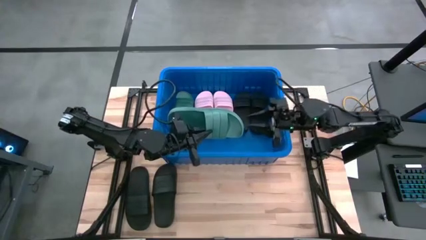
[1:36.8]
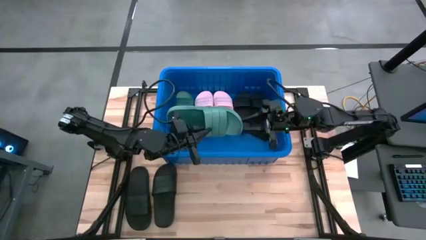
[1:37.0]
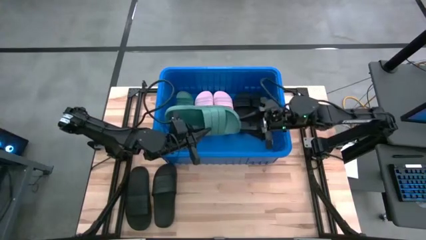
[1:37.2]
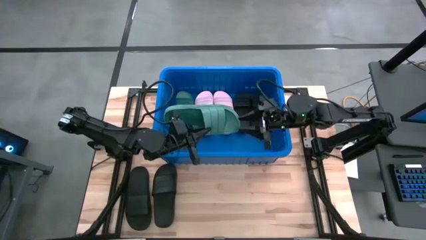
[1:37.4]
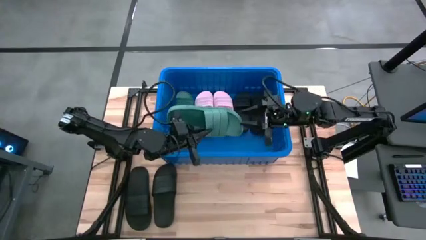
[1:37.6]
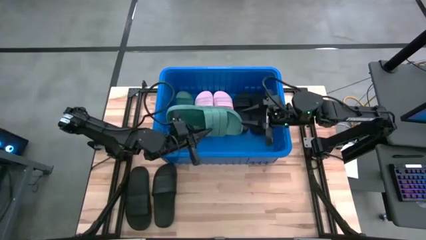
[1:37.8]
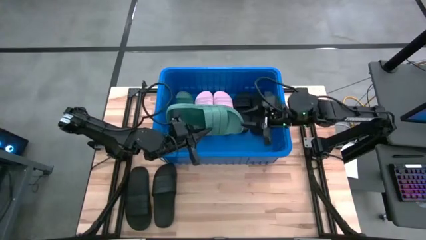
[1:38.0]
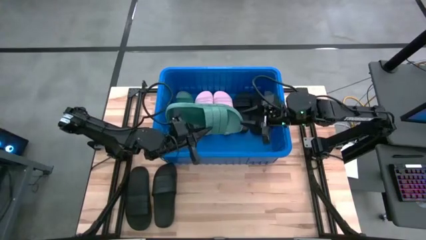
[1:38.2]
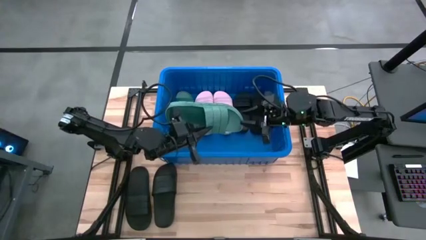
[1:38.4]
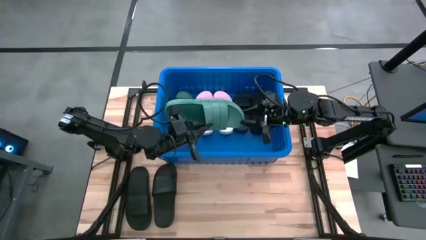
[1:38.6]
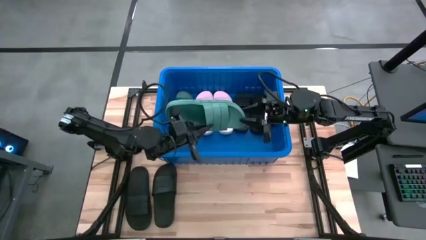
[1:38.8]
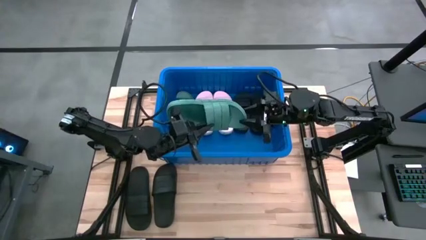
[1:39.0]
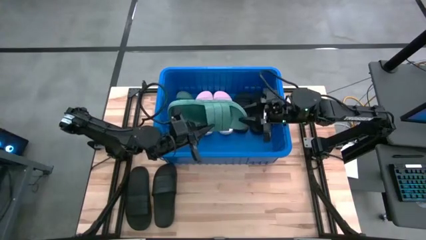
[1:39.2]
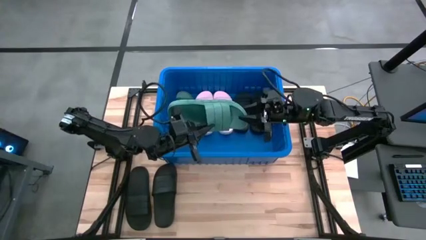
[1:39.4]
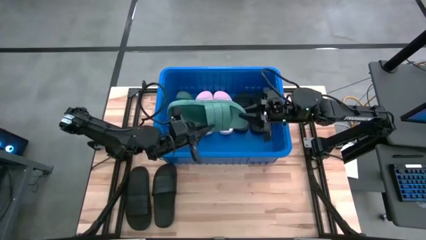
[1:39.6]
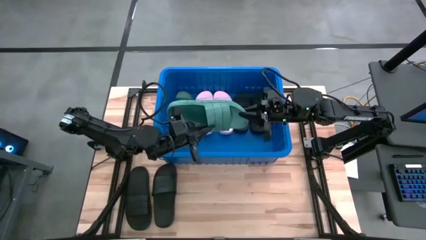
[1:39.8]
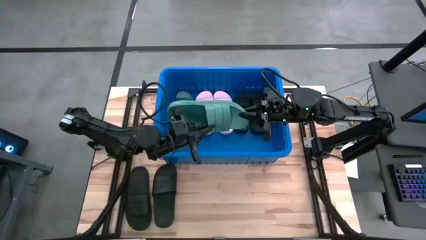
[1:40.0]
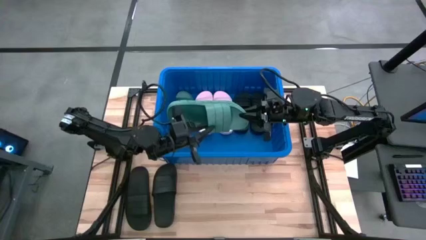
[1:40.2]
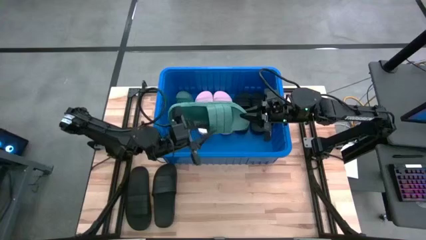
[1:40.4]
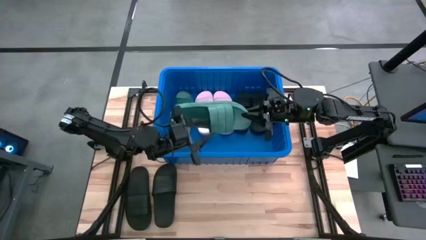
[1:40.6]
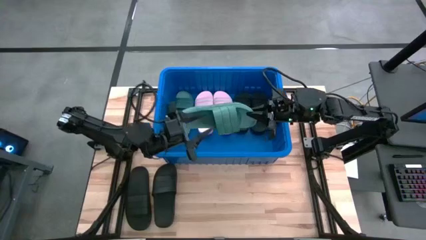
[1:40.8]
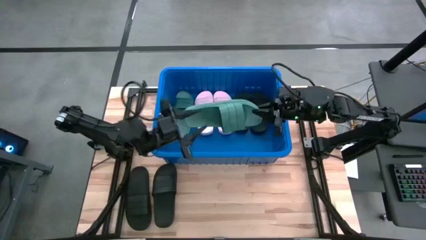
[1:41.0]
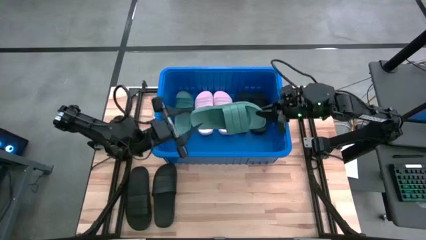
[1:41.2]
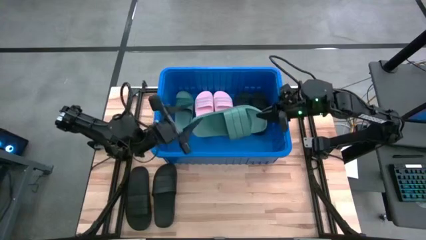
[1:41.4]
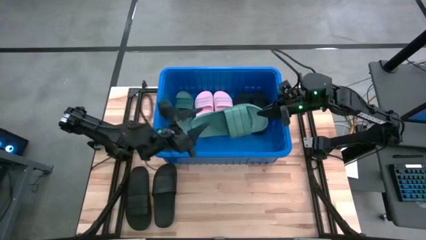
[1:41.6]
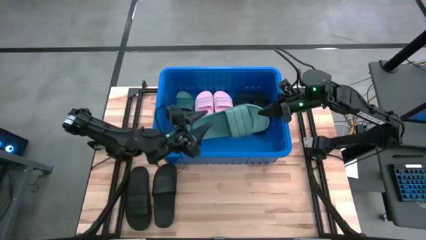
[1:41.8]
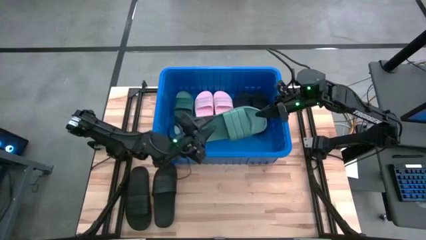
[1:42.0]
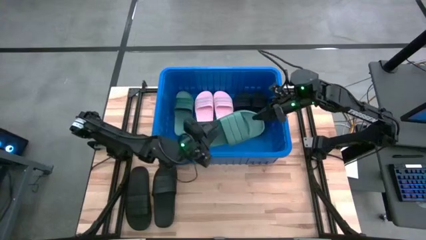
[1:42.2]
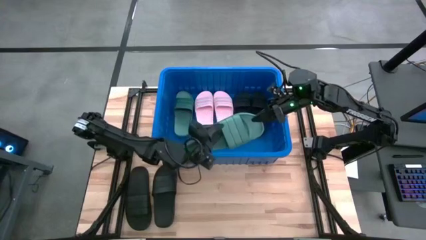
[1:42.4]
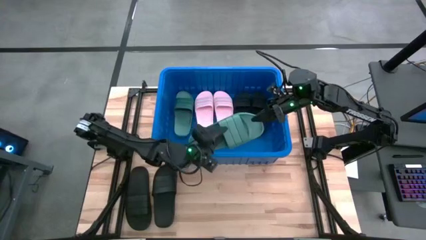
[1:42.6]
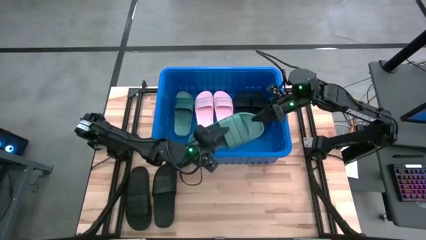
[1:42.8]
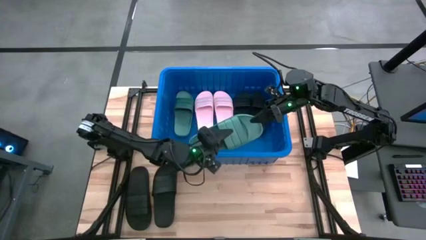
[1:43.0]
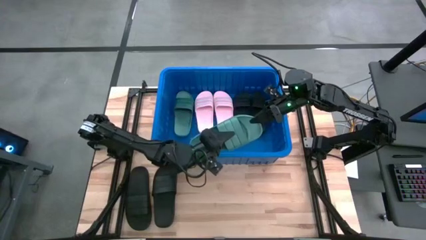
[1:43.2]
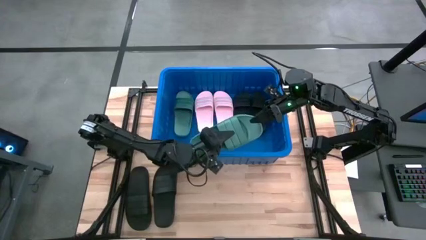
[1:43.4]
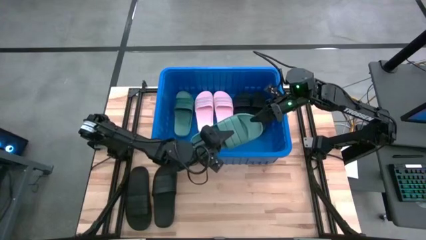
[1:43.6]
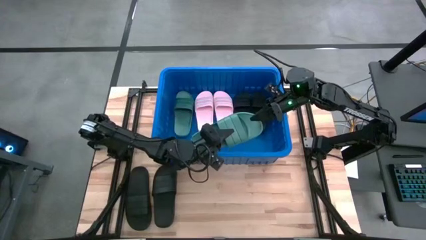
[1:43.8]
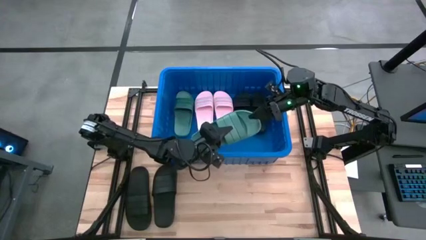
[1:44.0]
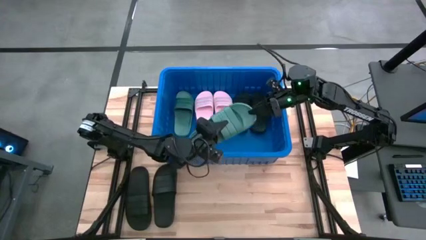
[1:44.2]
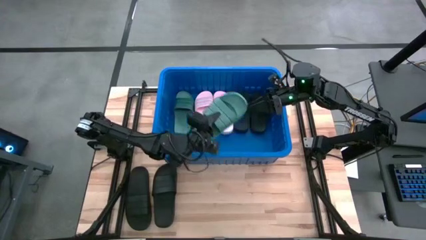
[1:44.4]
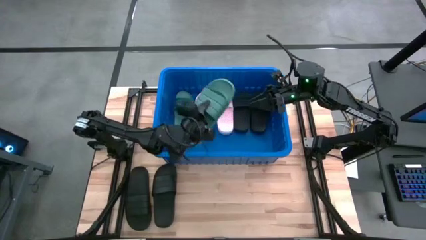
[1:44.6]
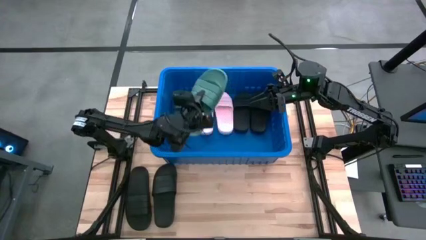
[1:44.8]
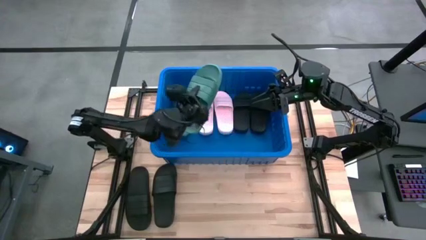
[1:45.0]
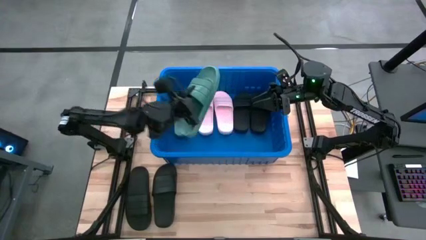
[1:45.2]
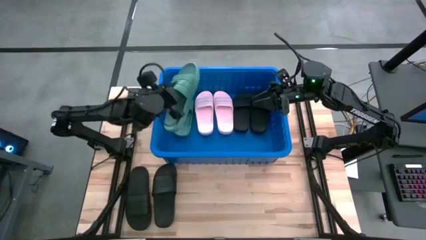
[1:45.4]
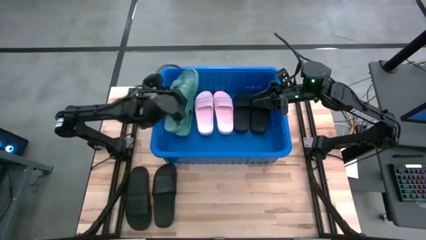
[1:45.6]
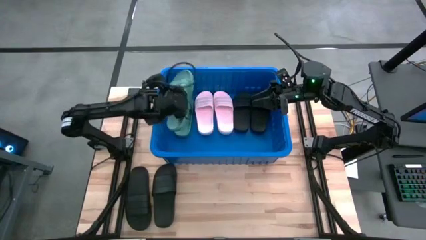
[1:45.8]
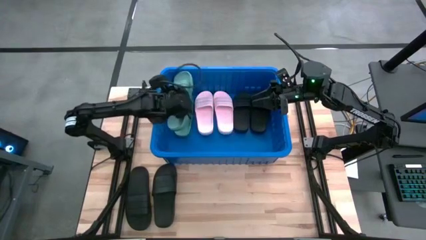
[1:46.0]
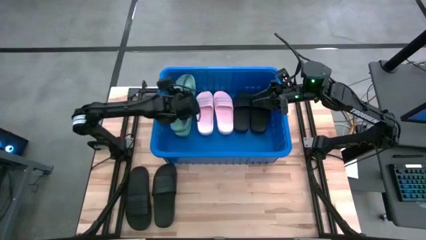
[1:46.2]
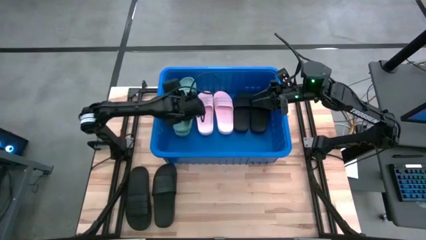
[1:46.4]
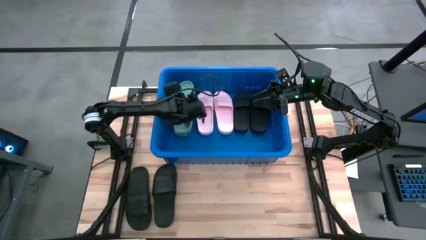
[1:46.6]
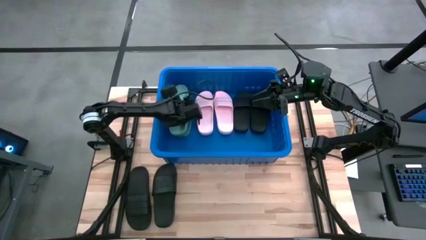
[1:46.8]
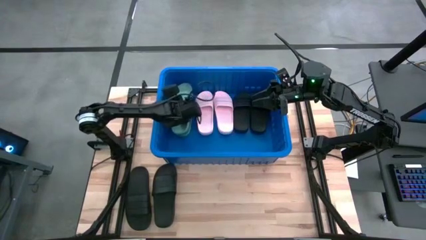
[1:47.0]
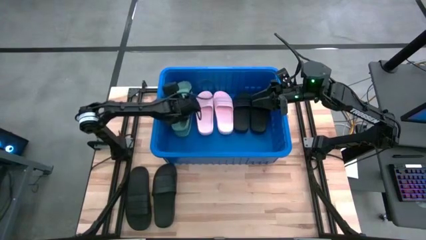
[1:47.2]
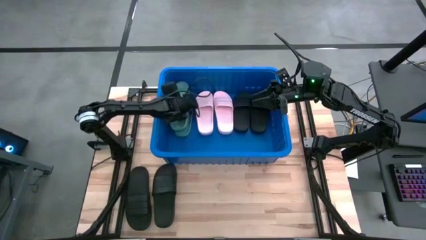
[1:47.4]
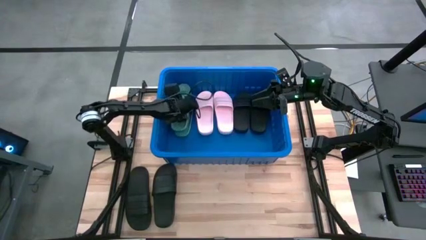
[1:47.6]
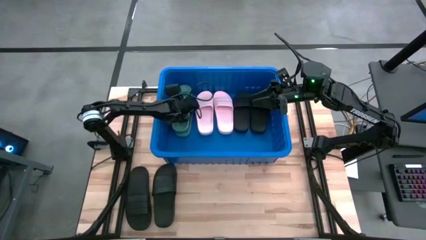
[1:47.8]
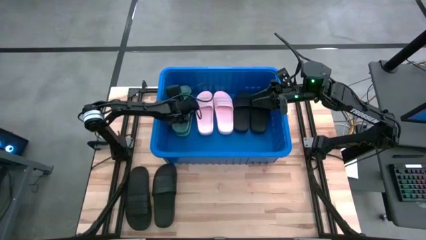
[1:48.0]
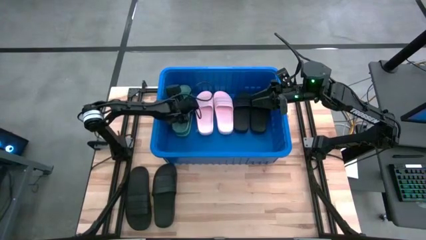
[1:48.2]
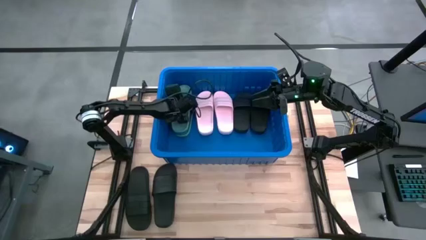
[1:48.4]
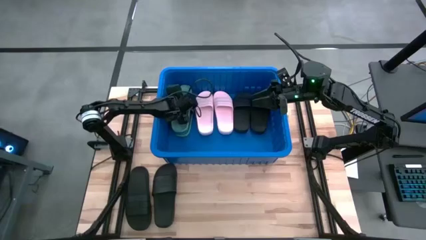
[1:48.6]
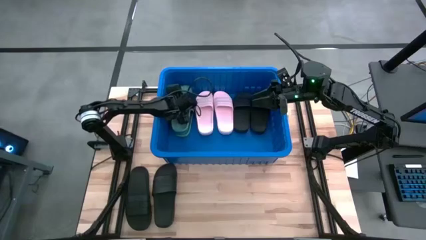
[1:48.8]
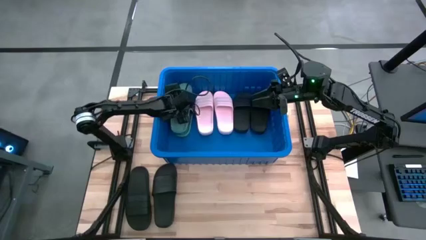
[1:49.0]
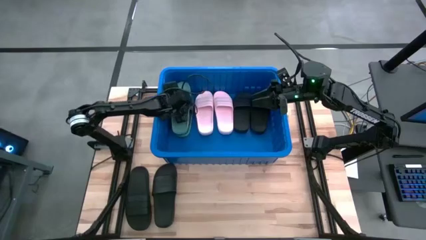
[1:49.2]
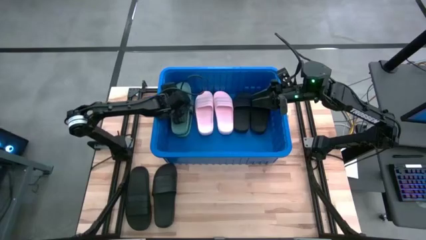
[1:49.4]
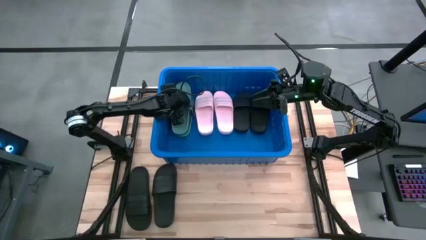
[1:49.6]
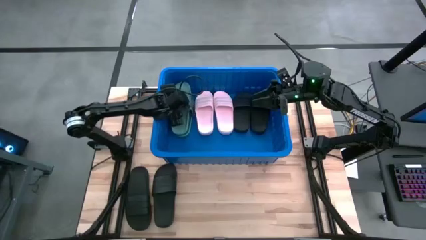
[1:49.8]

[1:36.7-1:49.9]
Task: Pick and place slides into bin
Put the green slipper into the blue bin
